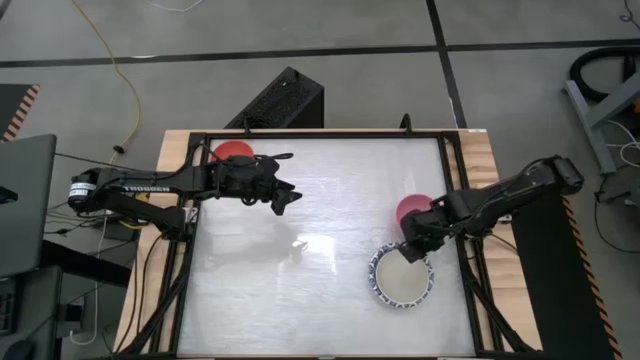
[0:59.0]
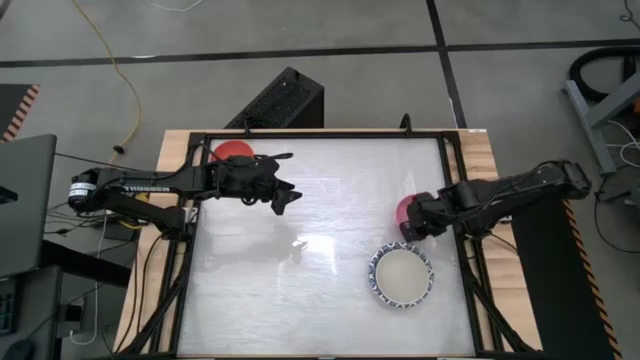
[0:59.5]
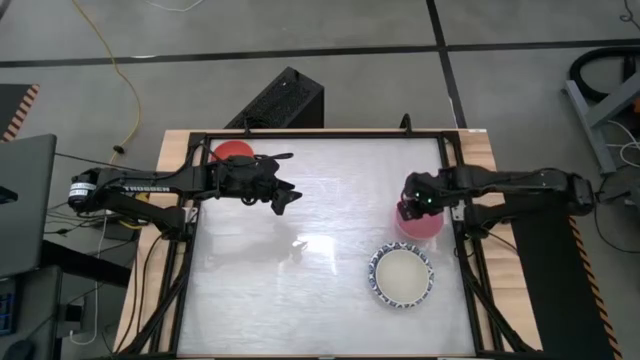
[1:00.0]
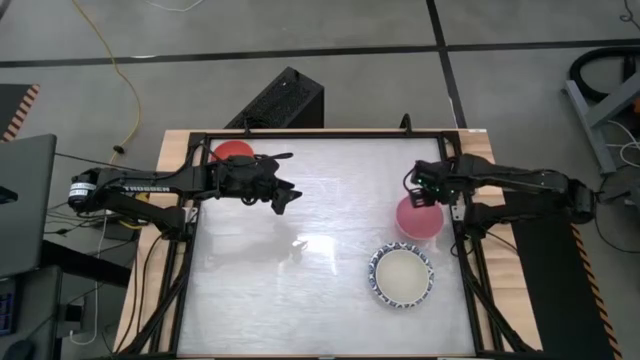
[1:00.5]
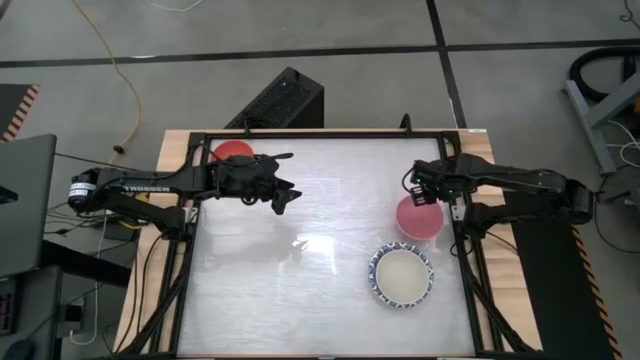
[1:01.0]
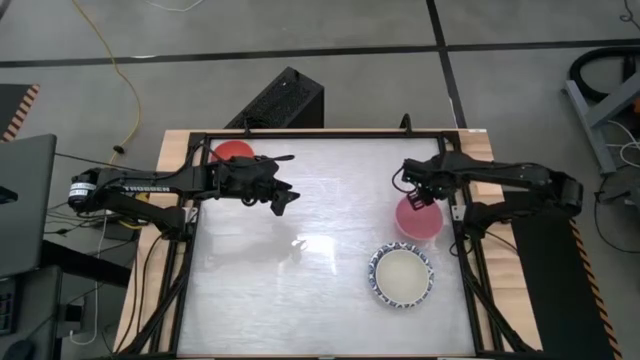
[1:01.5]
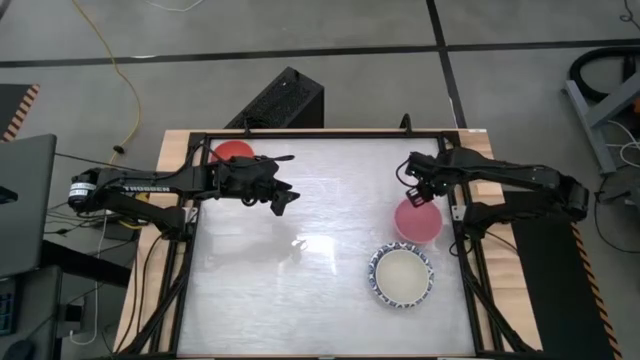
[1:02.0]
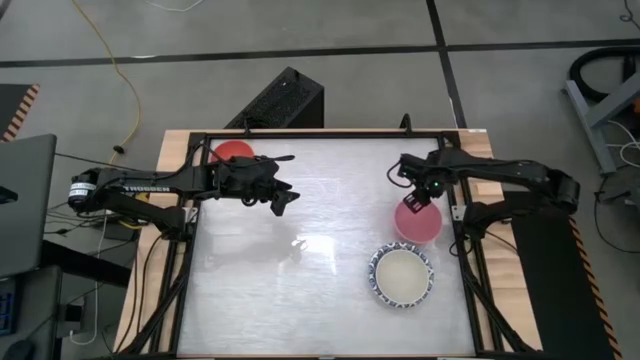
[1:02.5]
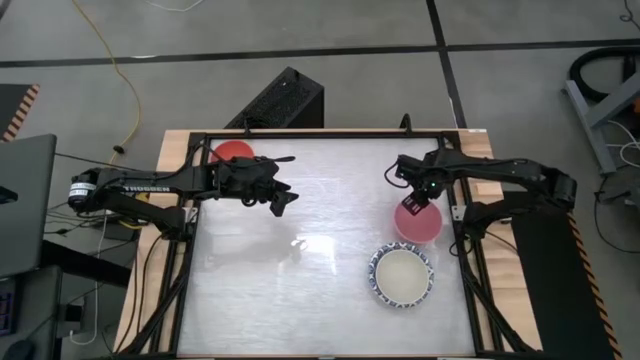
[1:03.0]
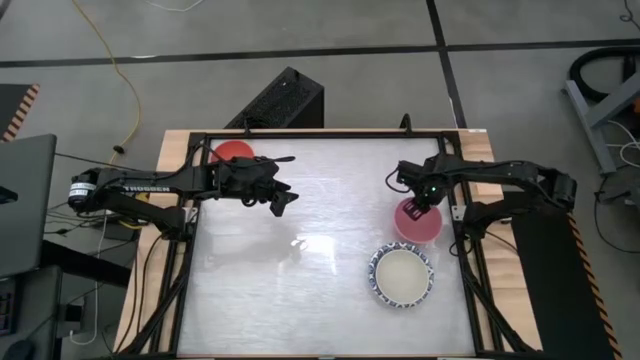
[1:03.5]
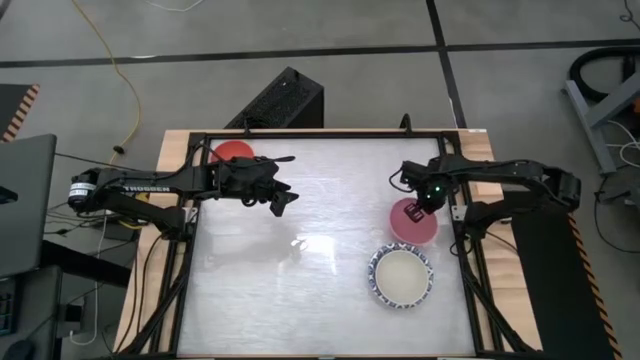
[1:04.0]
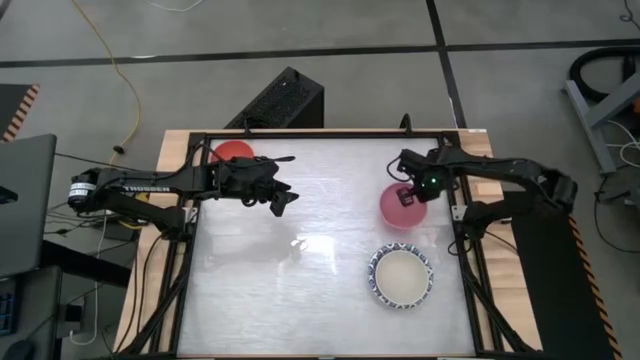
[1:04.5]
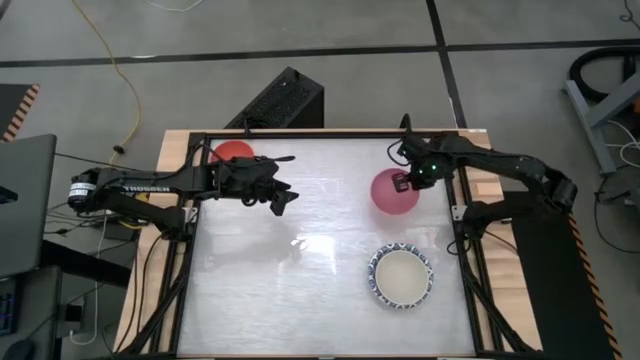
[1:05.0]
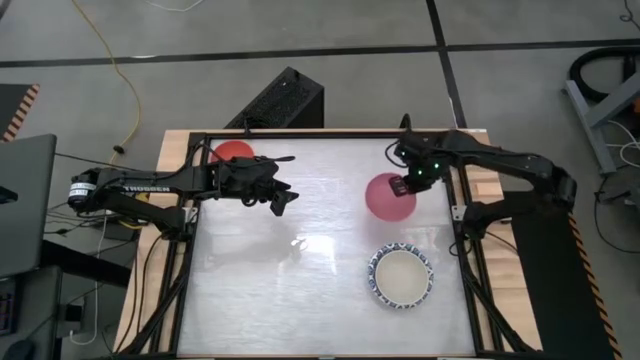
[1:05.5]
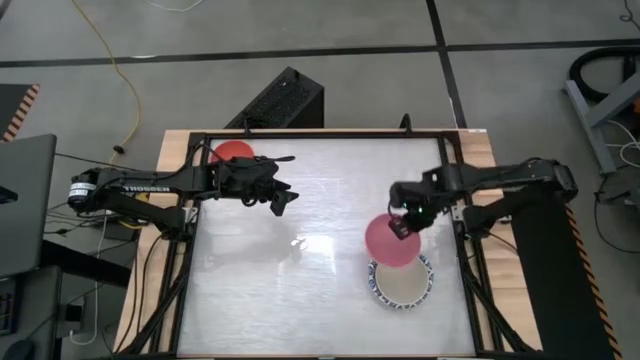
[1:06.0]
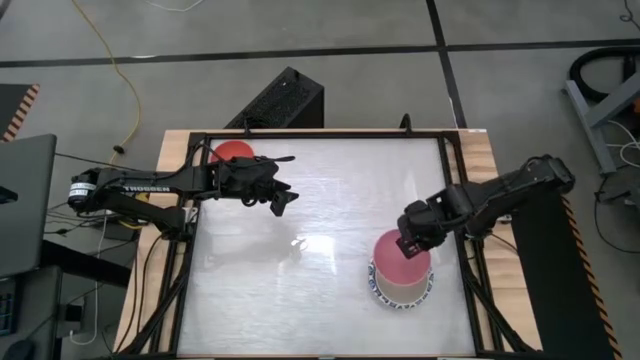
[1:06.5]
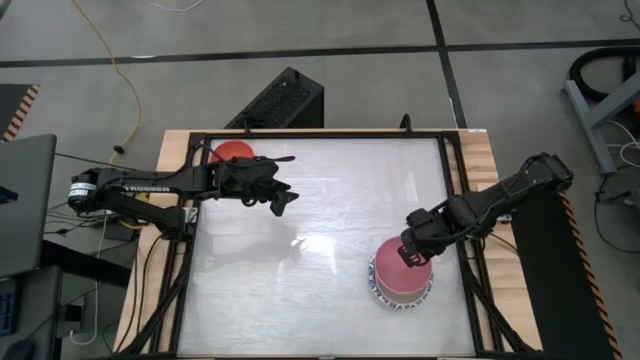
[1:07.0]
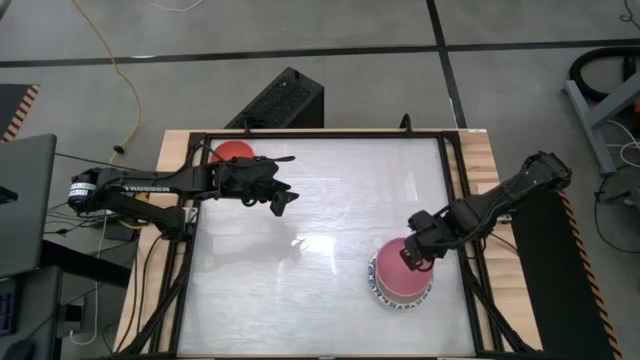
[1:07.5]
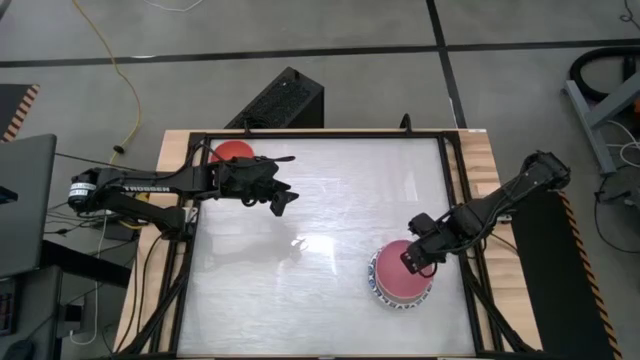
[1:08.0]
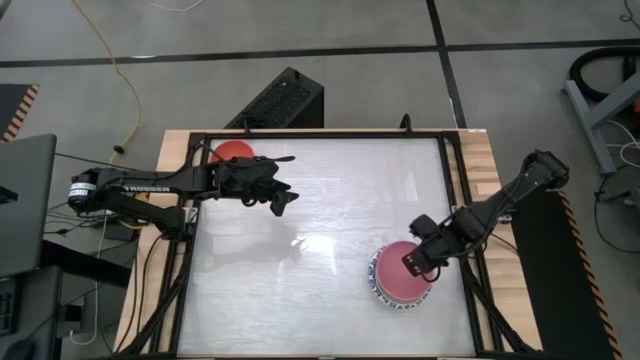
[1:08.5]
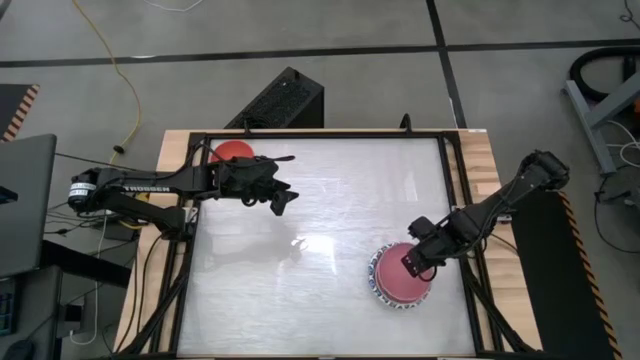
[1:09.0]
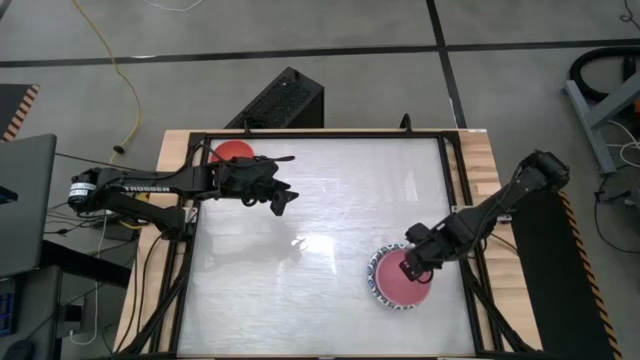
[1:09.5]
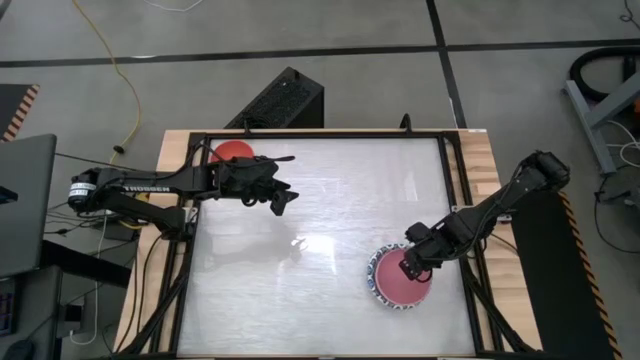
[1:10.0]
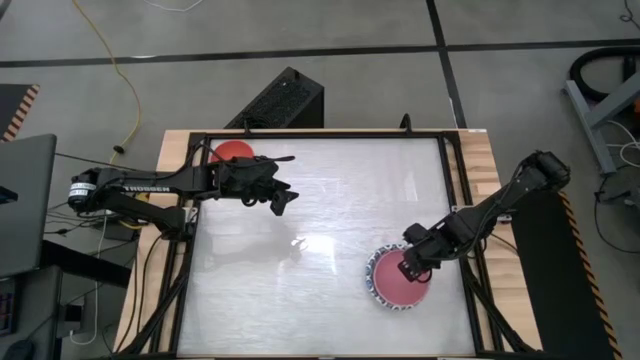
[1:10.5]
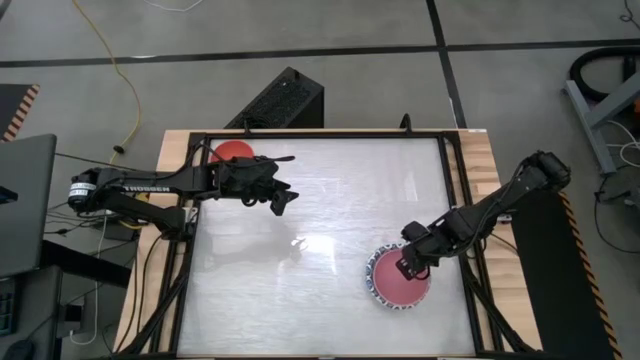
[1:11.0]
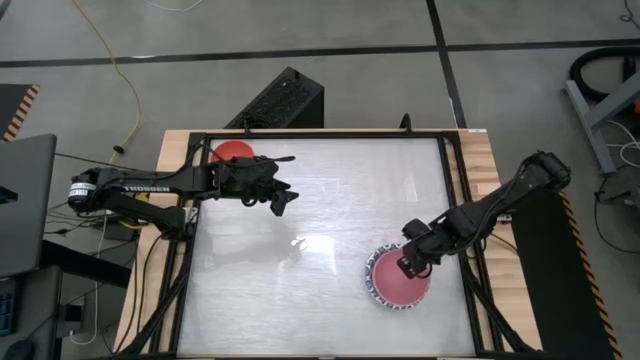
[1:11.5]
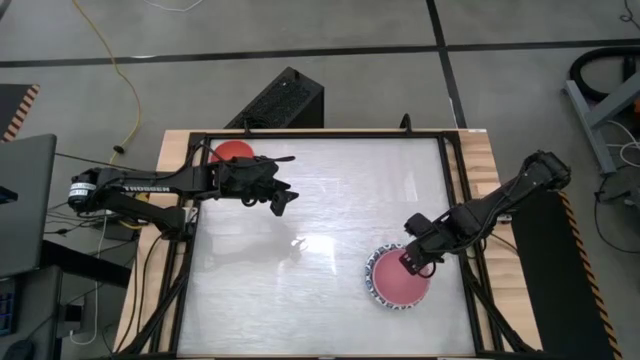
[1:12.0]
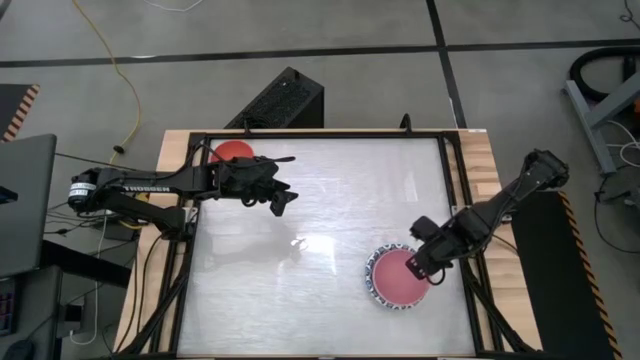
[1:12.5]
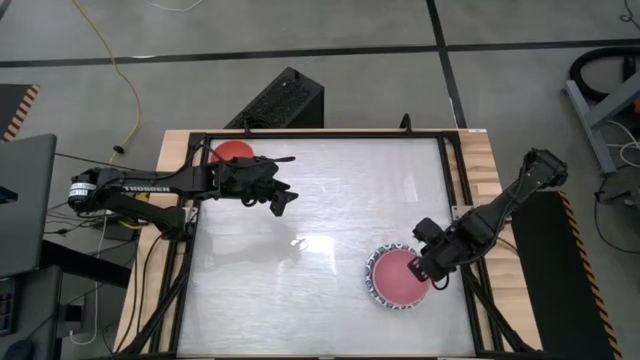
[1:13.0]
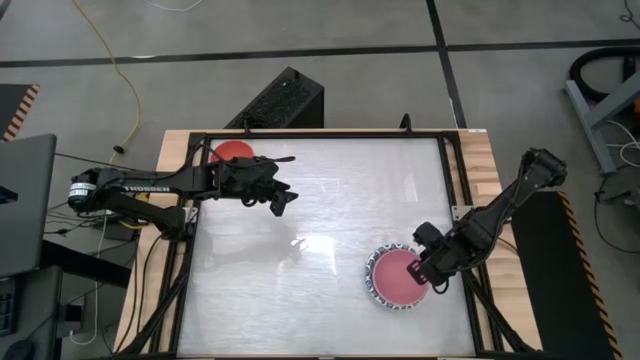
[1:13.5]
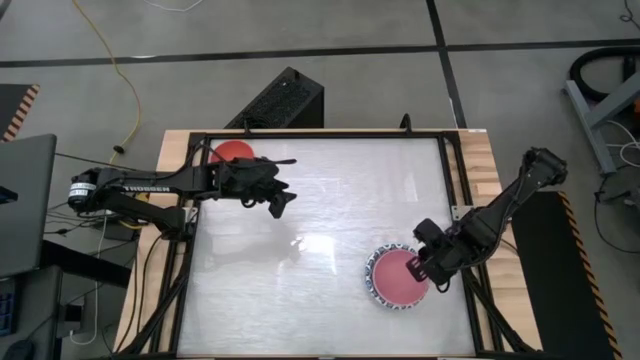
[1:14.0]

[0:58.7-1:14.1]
Task: Nest bowls inside each other by size order
Stack the pink bowl on top of the white bowl

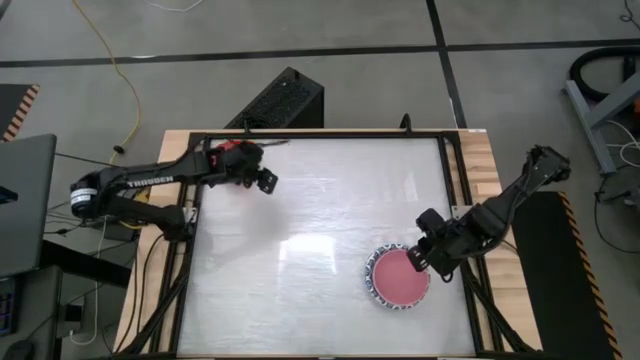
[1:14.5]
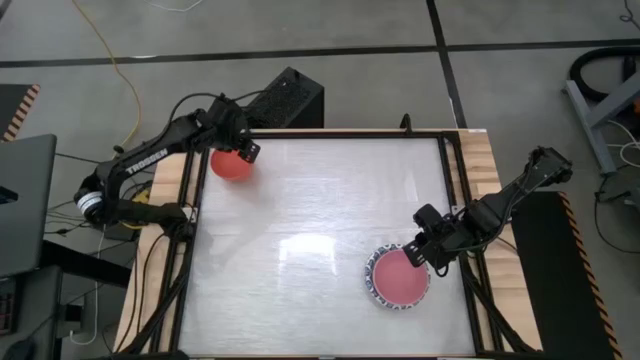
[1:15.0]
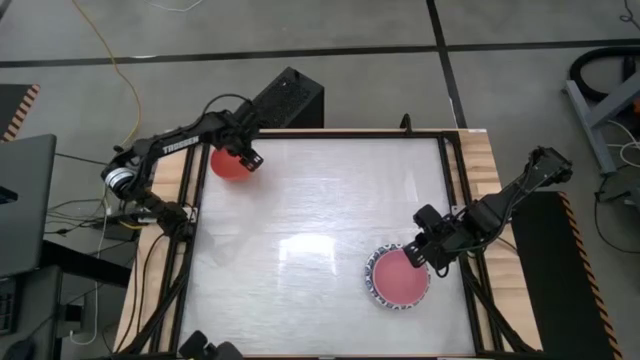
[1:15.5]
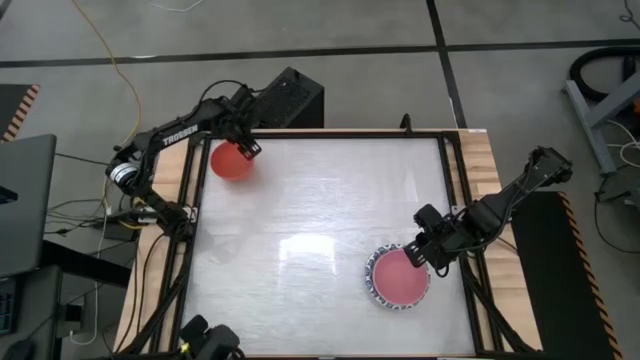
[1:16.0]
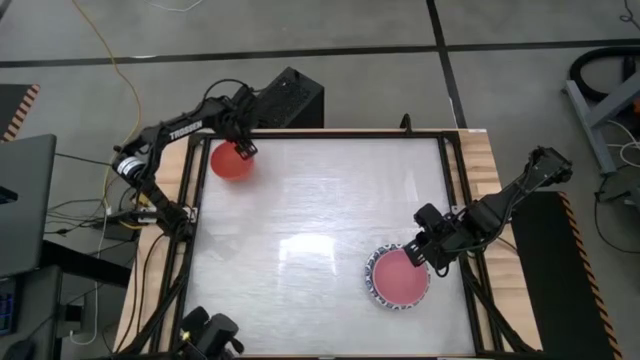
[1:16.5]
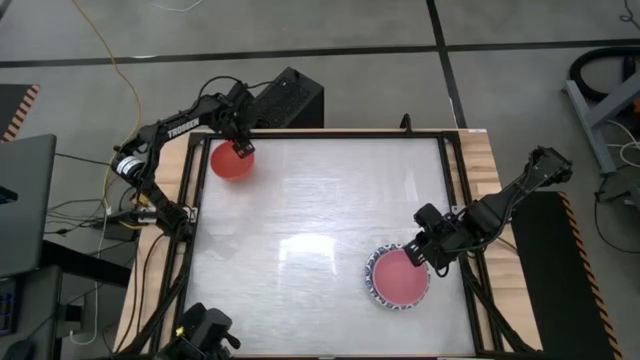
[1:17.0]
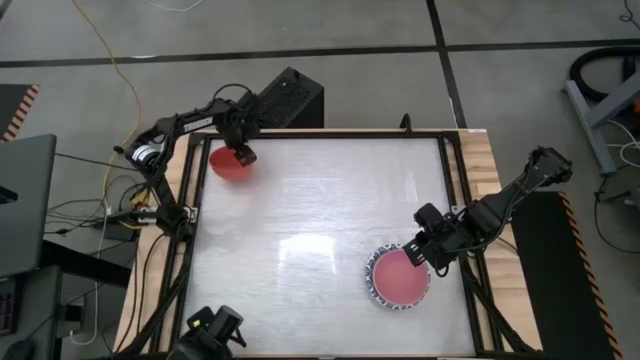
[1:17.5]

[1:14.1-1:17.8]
Stack the orange bowl on top of the pink bowl

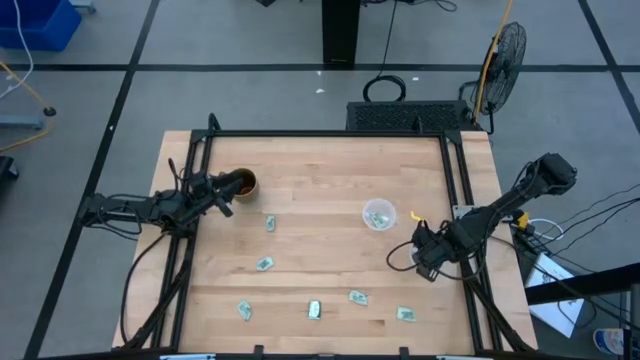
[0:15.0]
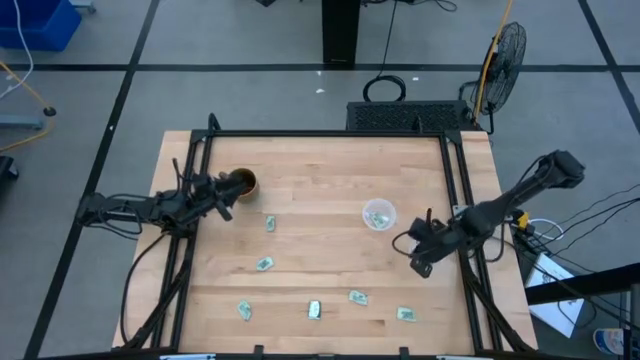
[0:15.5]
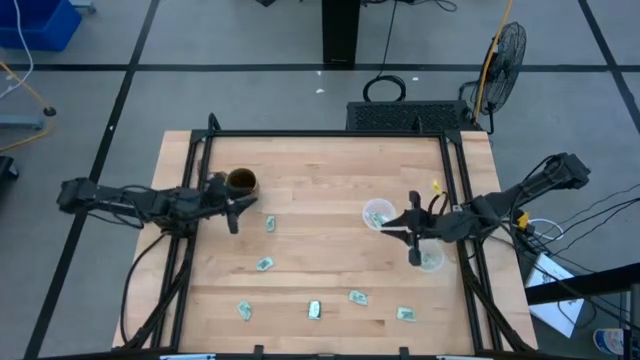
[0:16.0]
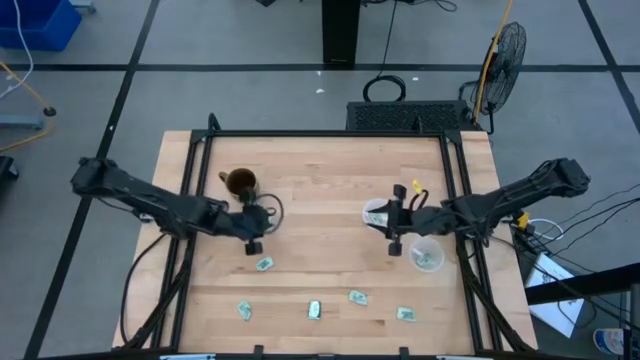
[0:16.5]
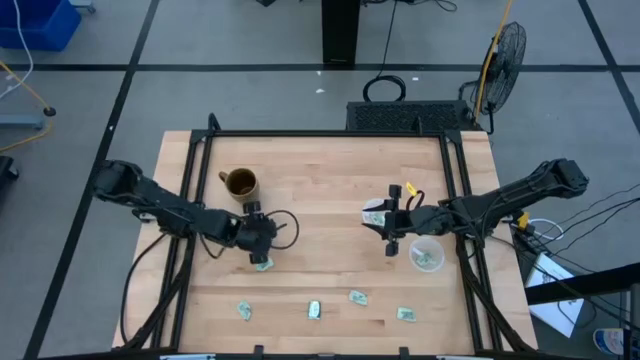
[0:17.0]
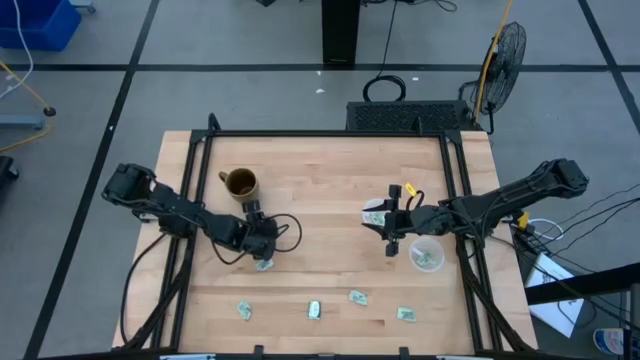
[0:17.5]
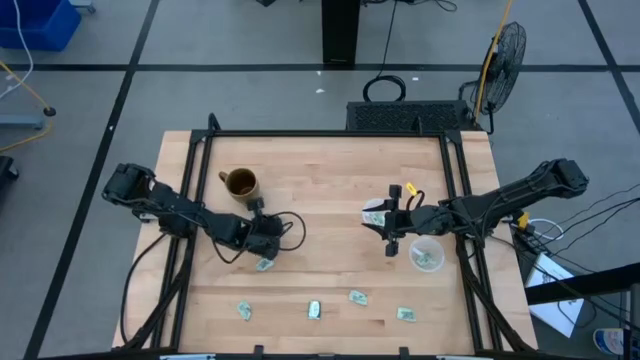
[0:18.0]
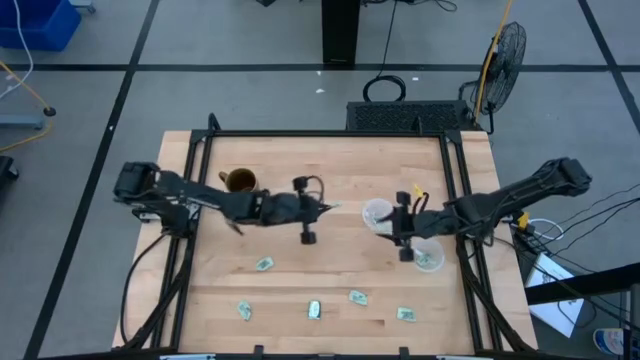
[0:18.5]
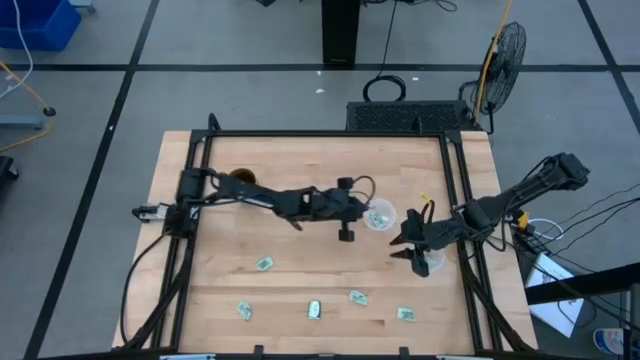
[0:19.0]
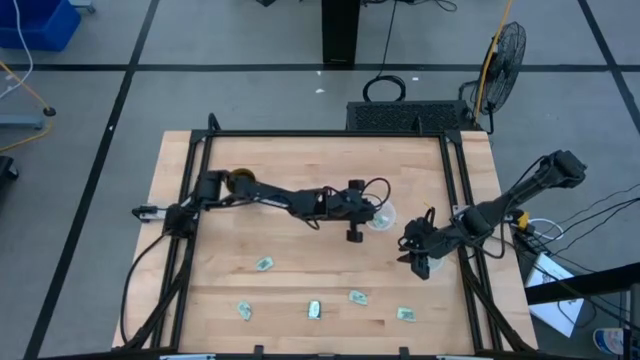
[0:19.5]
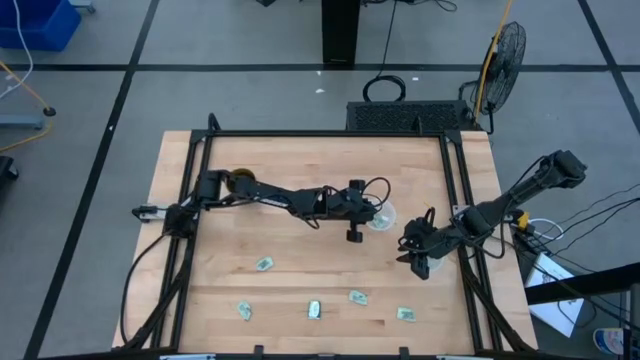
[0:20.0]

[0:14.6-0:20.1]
Task: Pick and place items into bin
Put the white stevia packet into the top transparent bin
